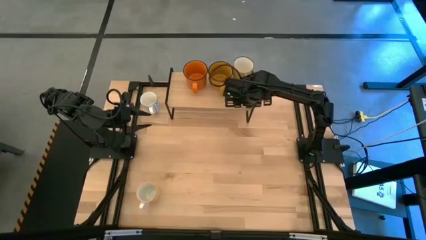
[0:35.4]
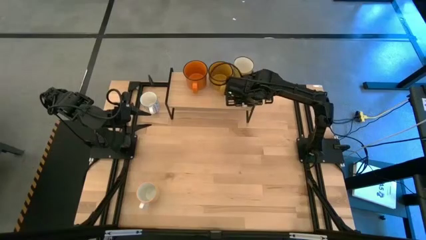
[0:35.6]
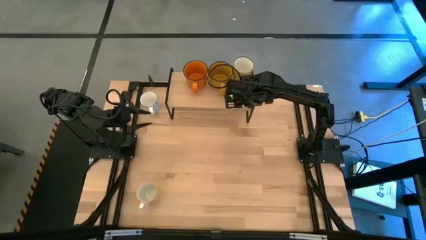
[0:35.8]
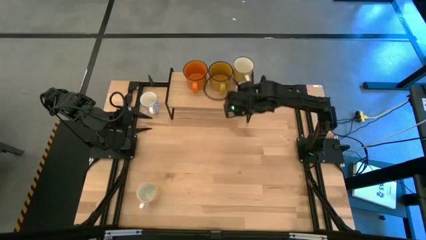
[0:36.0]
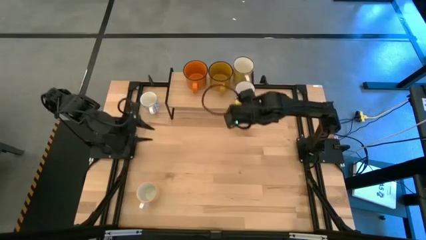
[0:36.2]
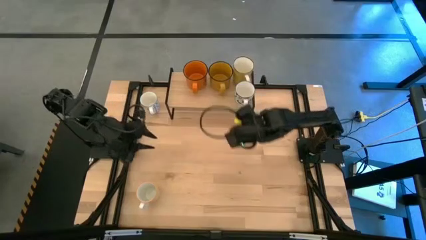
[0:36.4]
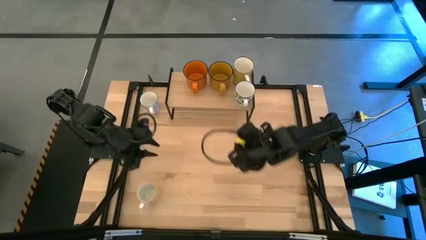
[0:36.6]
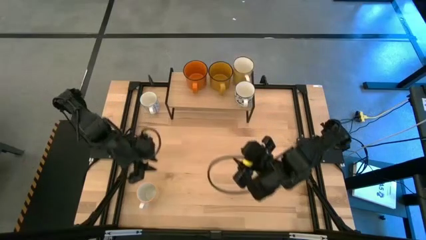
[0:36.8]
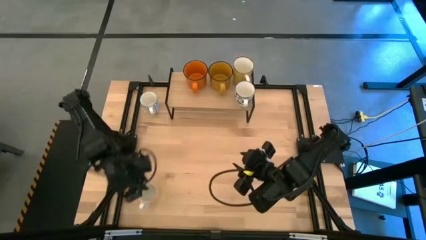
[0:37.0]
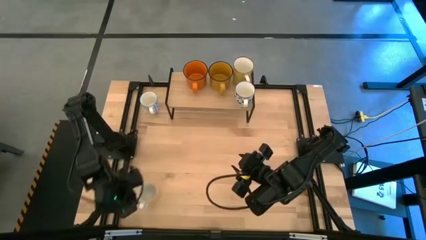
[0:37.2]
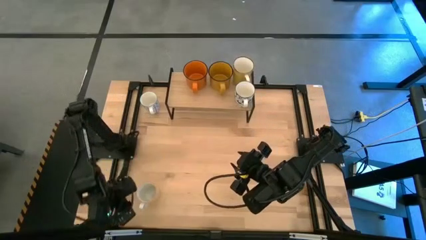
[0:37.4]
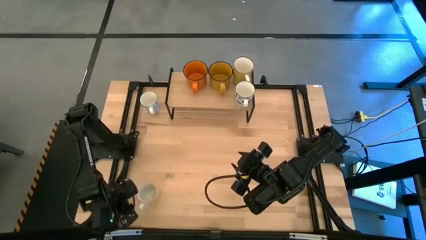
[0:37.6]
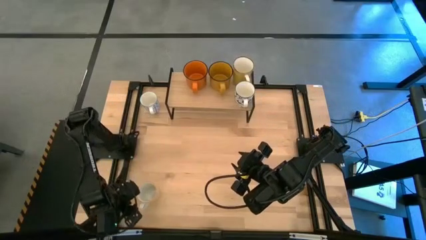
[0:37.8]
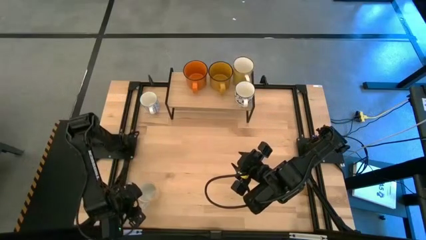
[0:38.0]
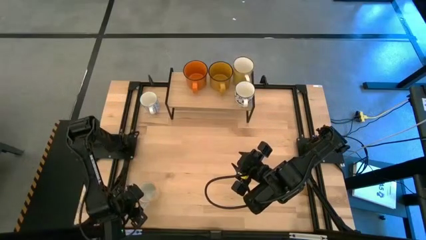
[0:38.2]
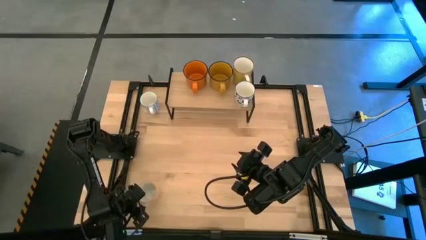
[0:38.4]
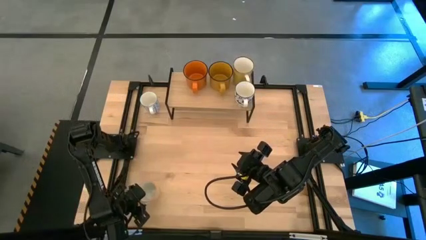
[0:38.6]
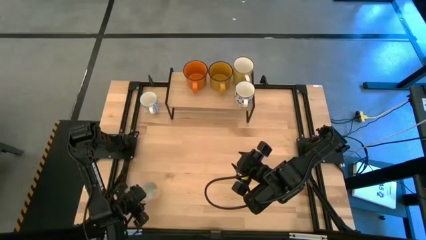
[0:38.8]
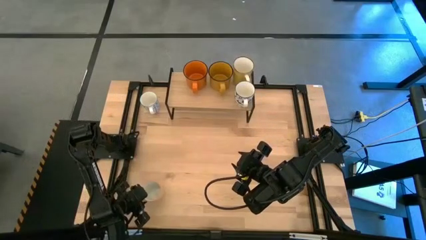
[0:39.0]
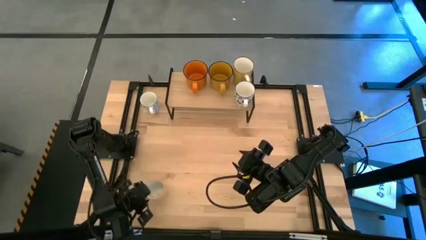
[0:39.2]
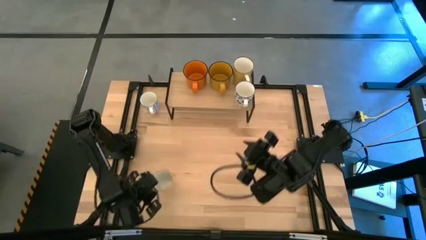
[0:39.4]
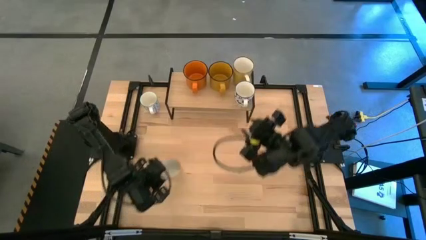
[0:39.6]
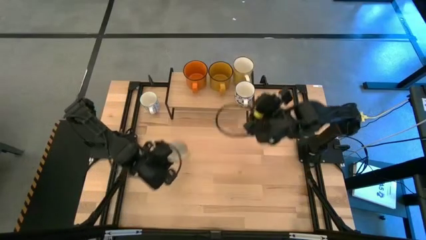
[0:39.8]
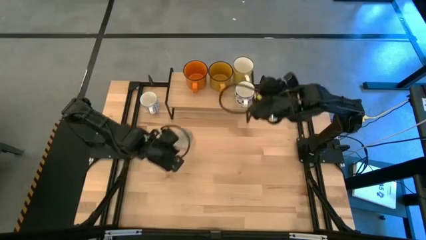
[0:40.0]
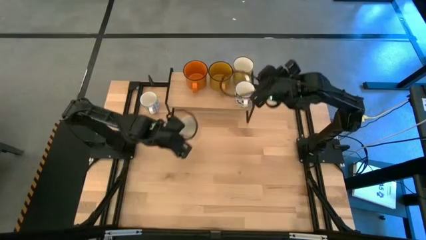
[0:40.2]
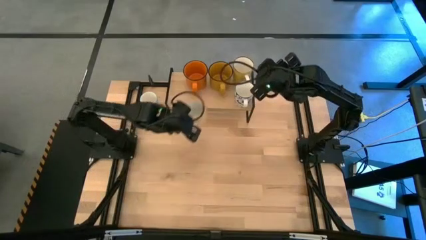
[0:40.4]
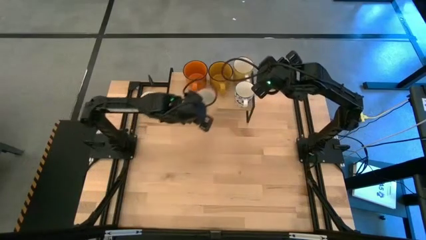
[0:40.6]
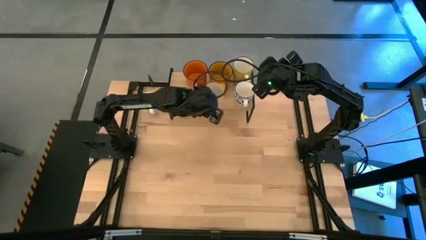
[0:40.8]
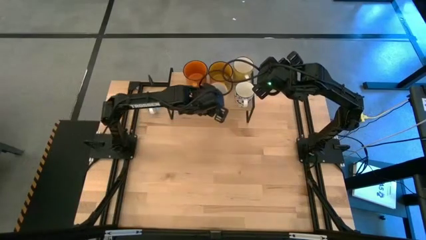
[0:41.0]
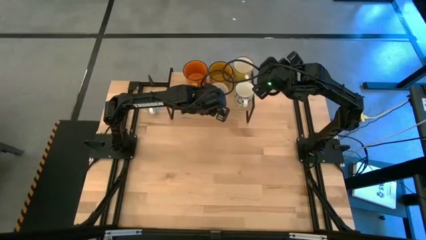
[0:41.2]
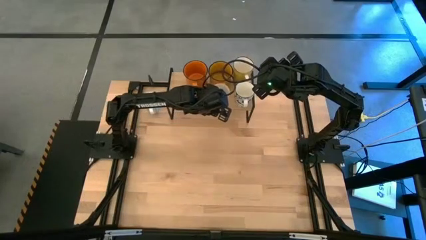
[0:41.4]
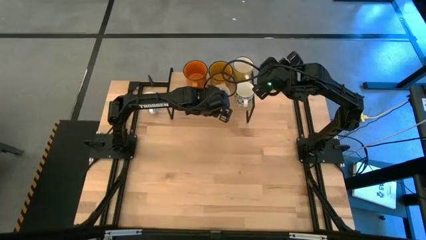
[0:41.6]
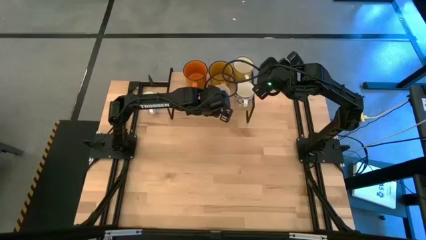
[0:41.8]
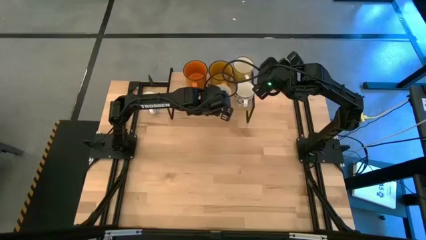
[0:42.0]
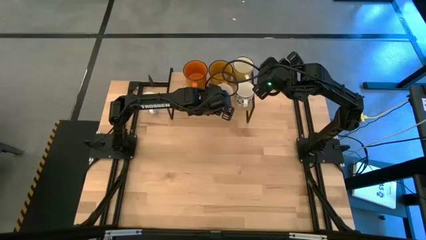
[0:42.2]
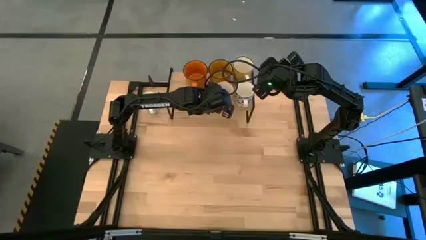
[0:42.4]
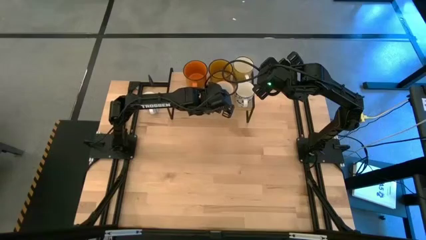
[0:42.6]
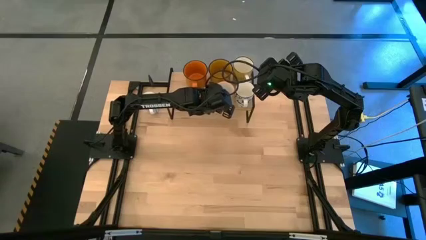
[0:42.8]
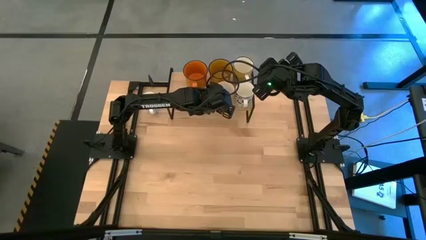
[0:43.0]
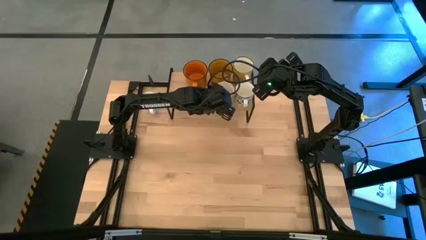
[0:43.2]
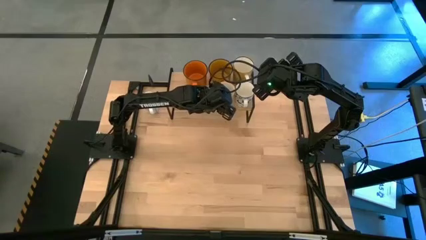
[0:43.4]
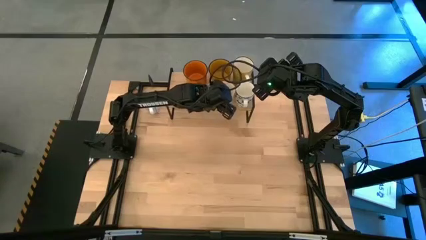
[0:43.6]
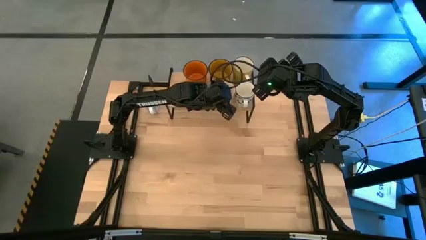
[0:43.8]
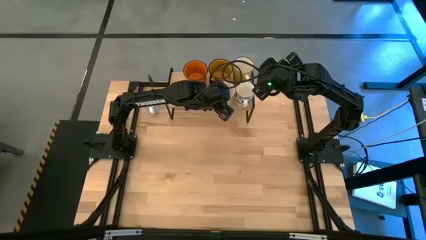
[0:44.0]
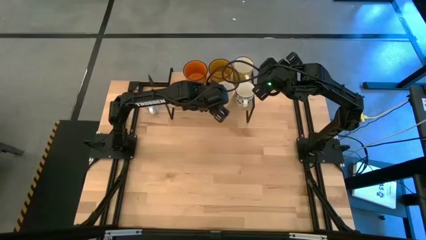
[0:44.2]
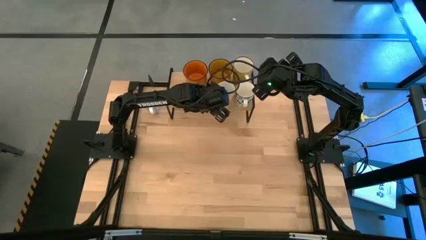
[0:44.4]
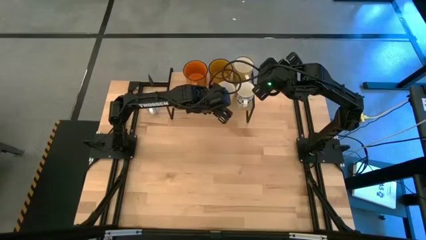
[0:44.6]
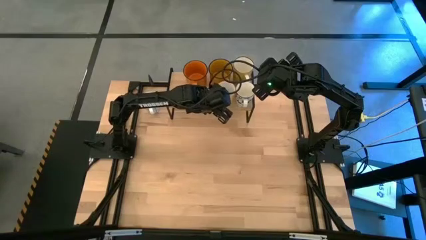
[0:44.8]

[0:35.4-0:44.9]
Task: Place coffee mugs
Put the yellow patterned mug on the shelf

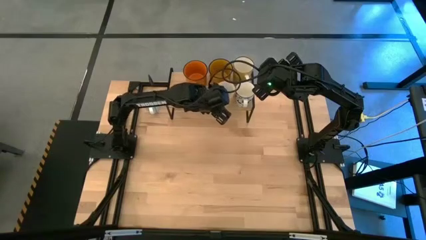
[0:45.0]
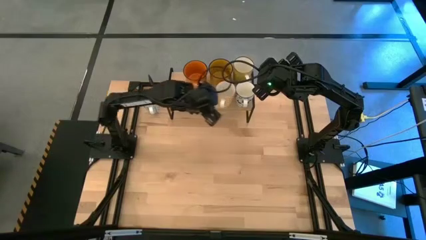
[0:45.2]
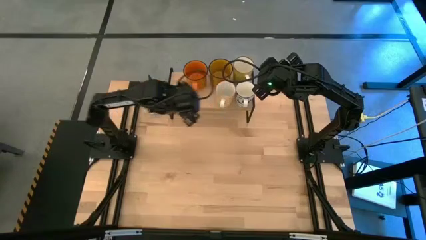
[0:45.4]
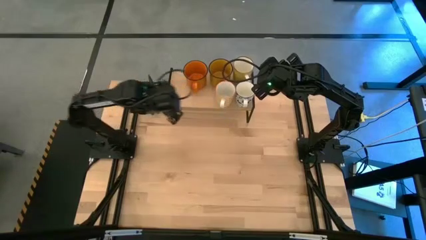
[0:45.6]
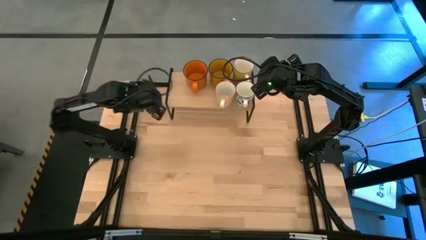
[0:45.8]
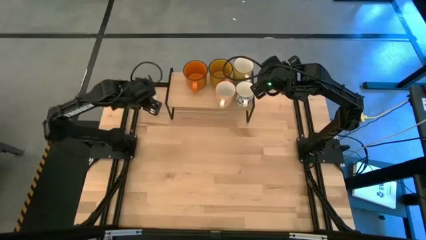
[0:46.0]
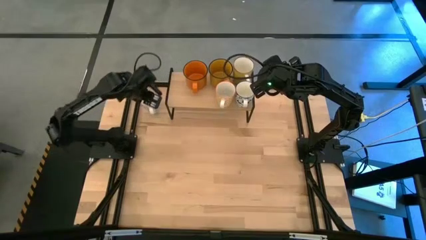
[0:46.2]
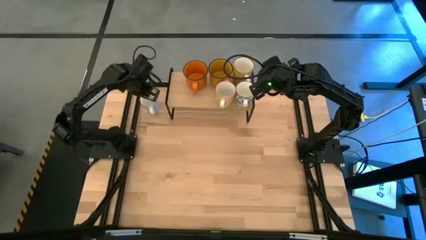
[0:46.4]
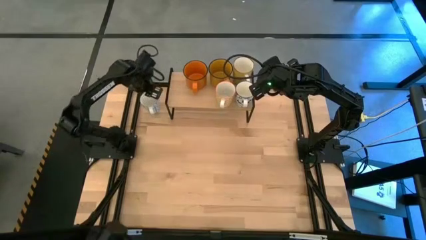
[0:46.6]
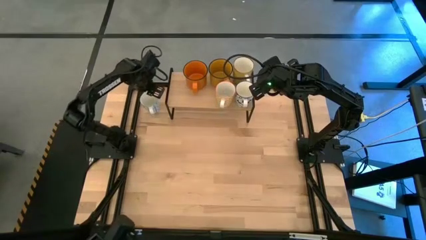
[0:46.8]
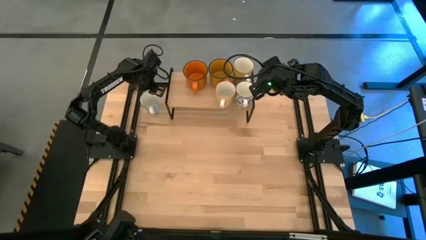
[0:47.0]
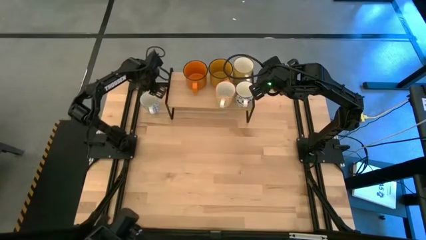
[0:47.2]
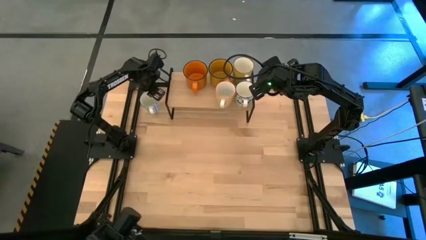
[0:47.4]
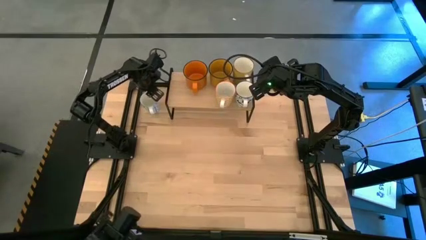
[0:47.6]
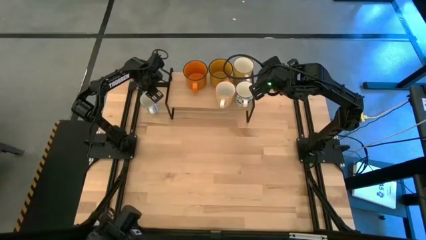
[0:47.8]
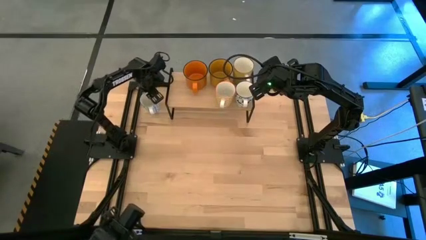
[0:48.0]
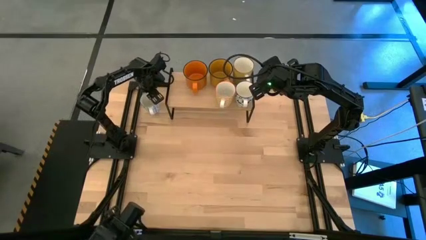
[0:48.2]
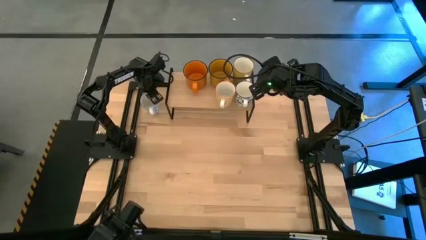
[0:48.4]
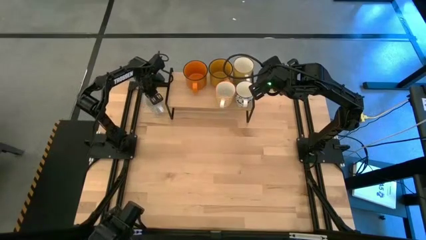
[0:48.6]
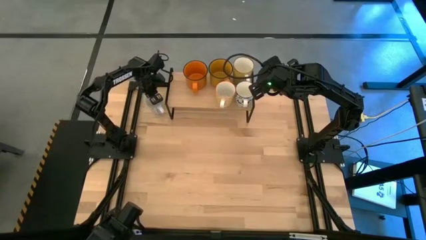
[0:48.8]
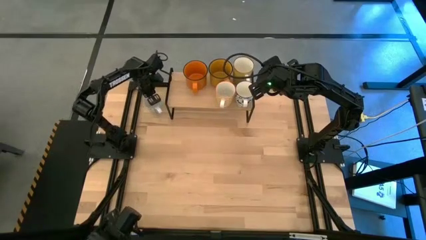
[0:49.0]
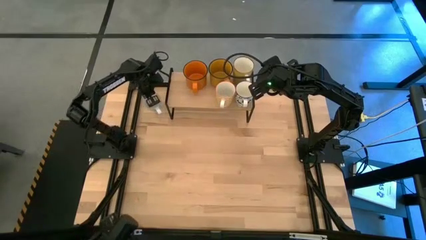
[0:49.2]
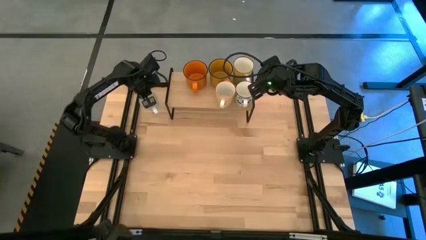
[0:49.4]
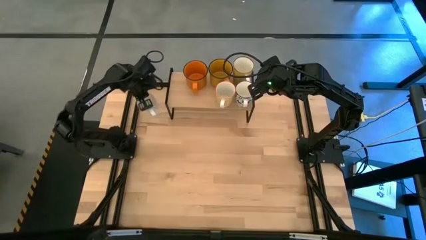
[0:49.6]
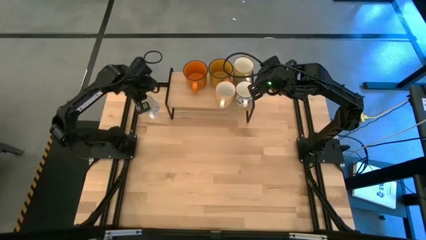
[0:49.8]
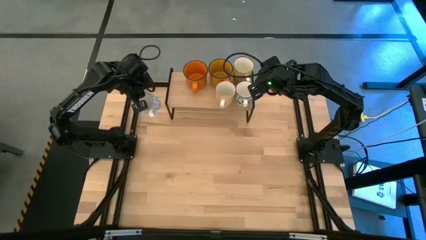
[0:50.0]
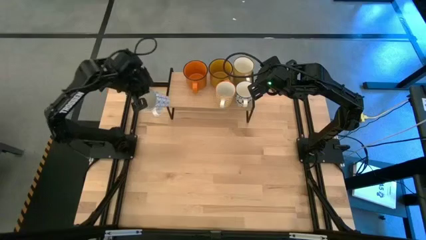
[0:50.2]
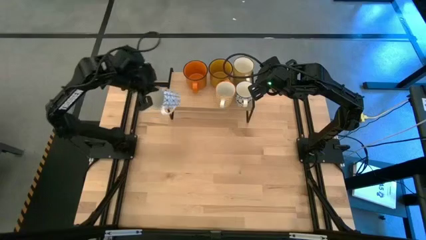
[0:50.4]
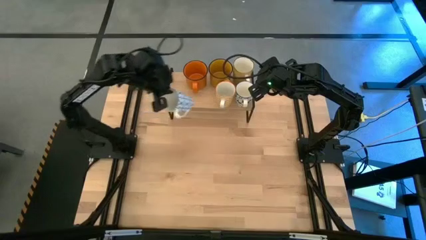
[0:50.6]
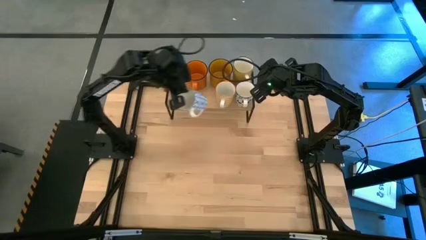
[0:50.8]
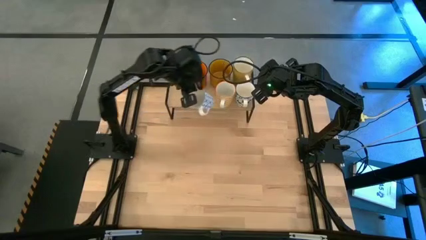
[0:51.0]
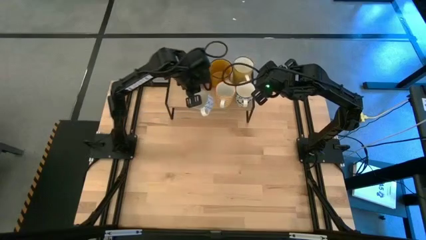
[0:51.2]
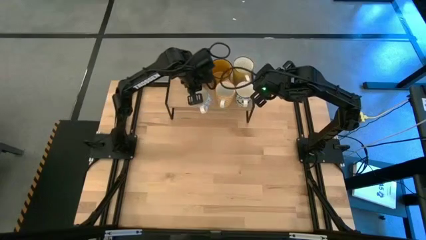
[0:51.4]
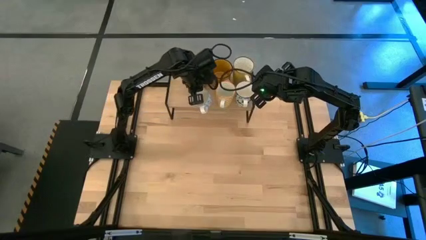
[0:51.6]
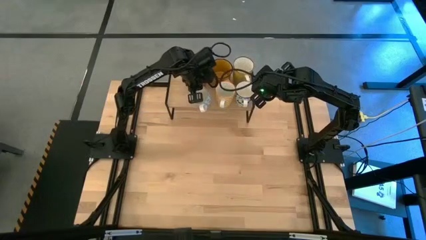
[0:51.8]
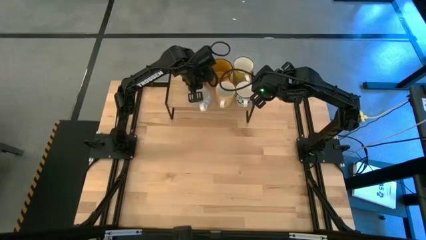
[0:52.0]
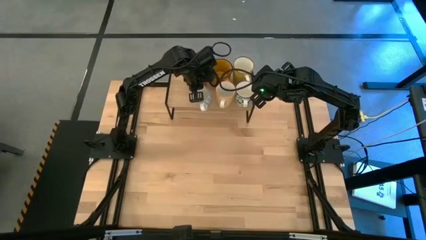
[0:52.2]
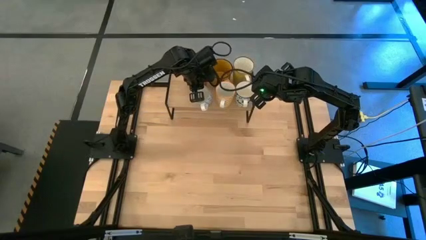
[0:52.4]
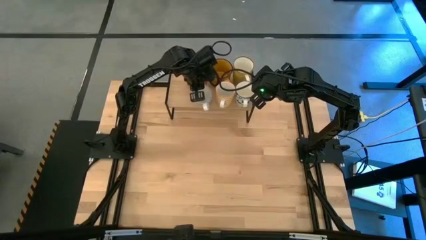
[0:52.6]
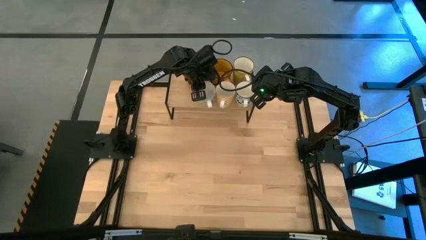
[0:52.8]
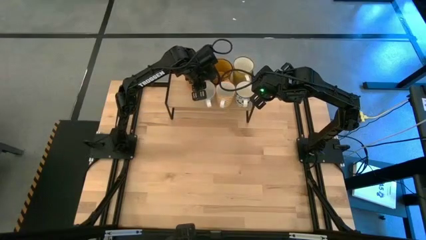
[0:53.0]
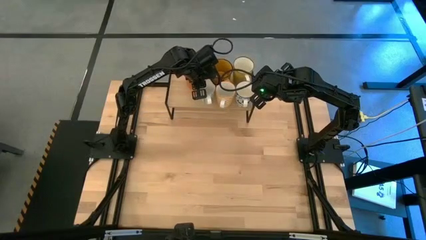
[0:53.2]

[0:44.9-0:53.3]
Put the blue patterned mug on the shelf
